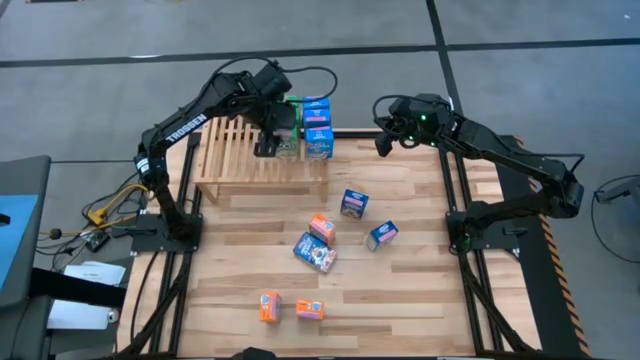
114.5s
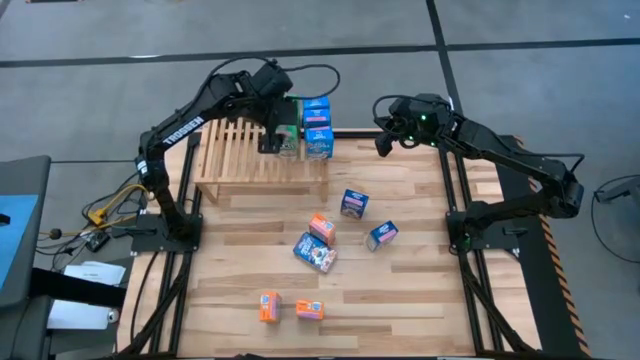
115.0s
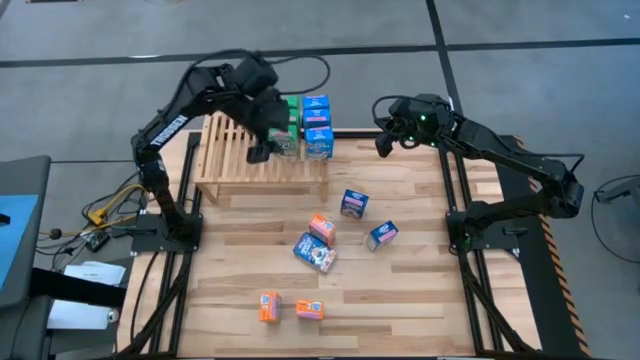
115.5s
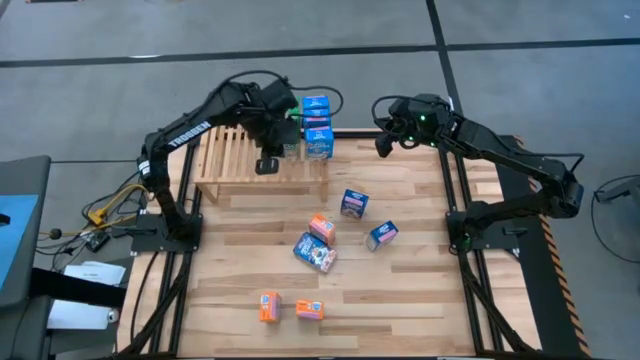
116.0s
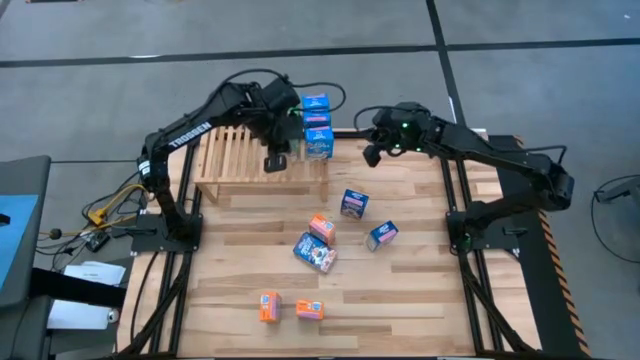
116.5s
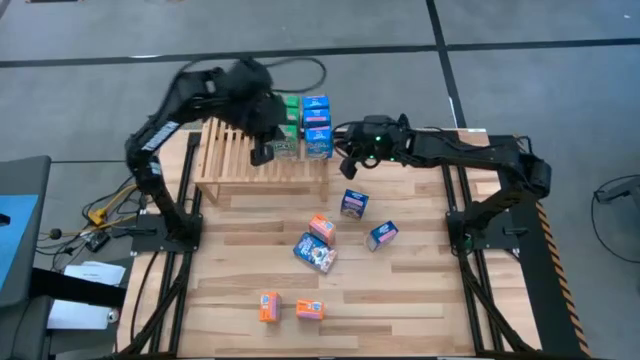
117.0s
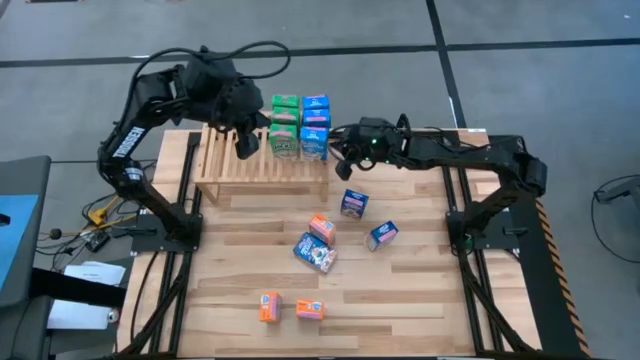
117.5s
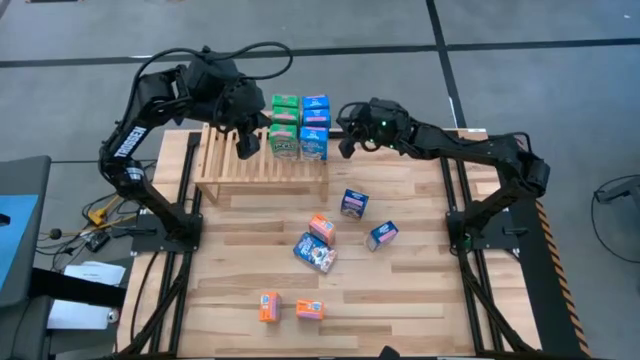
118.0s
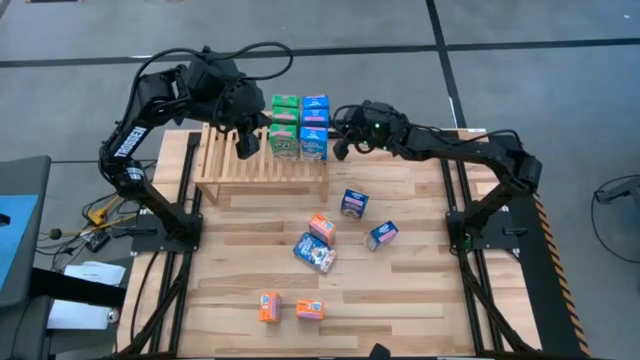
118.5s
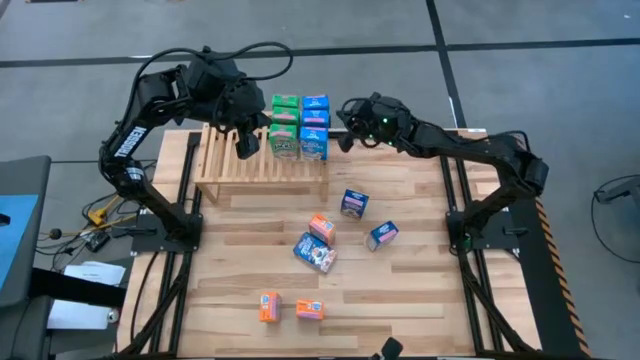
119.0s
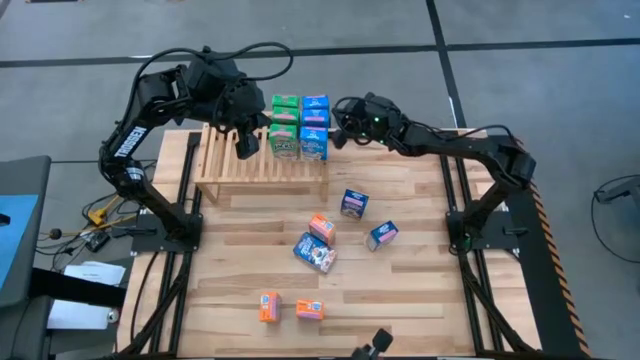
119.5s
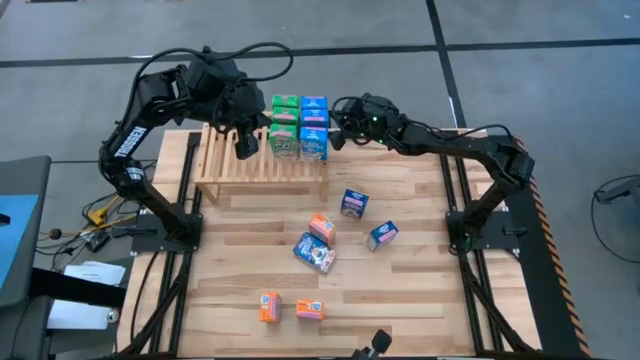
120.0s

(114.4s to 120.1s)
Task: Stack cereal on shelf
Adjust the cereal boxes on the shelf

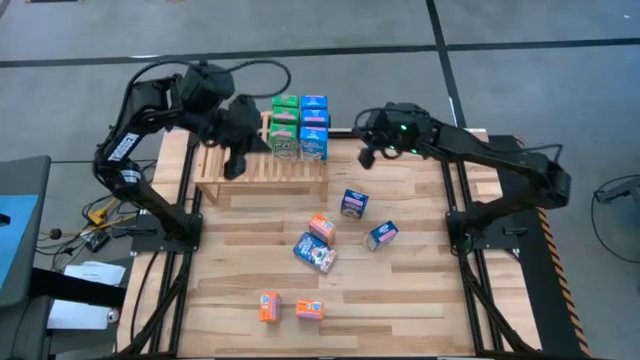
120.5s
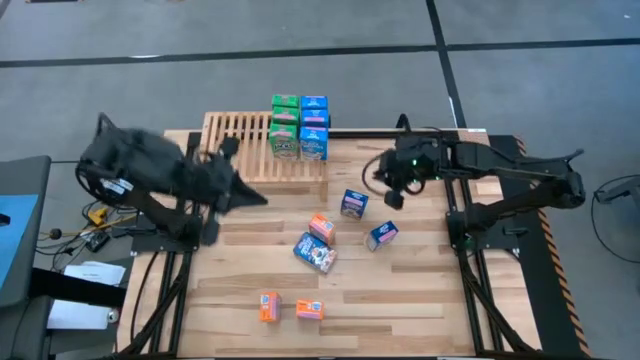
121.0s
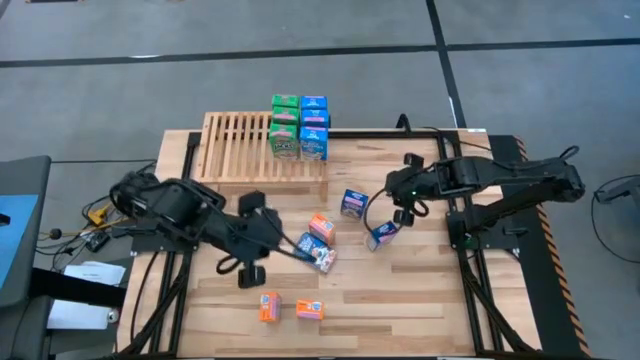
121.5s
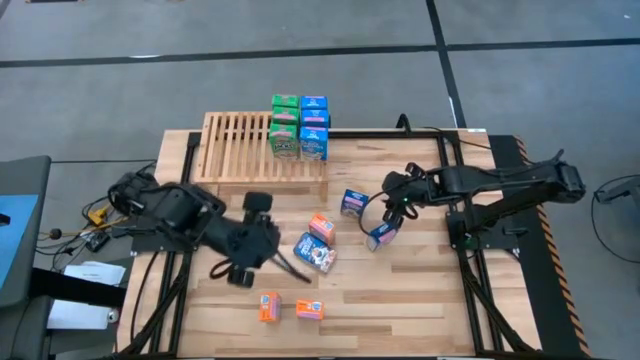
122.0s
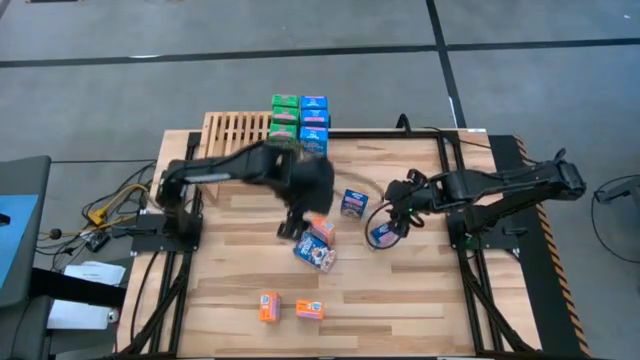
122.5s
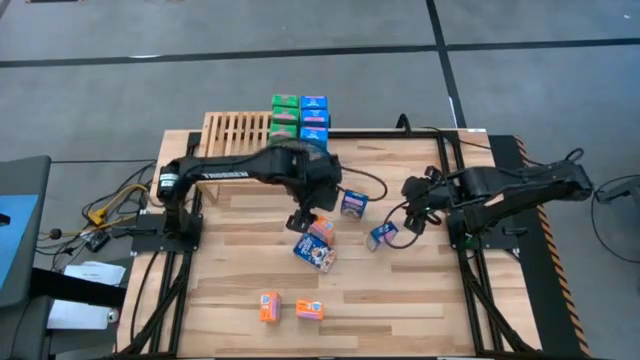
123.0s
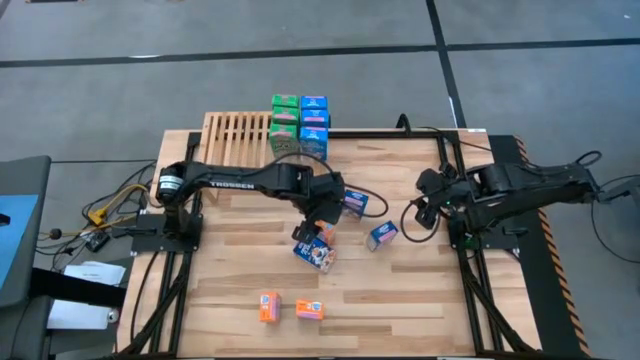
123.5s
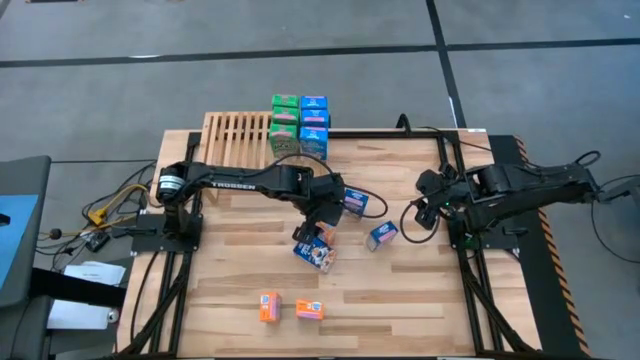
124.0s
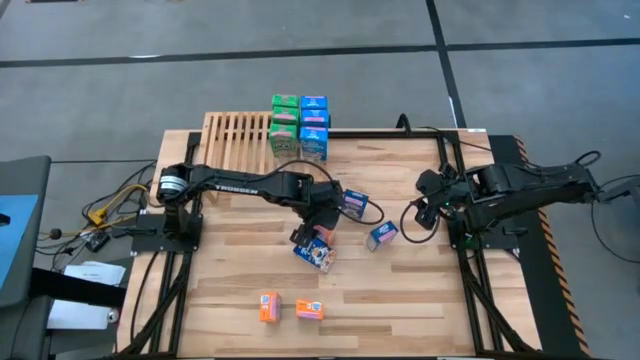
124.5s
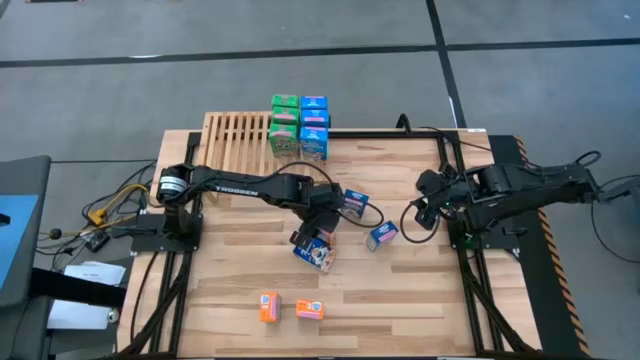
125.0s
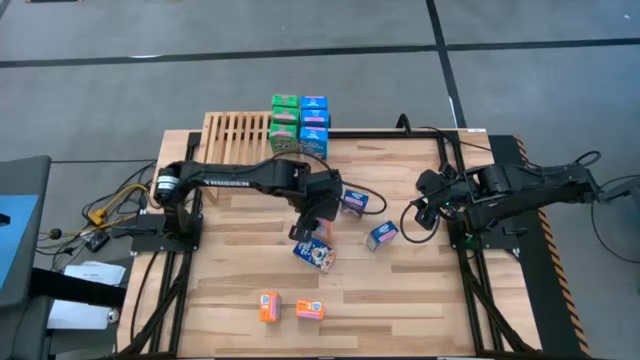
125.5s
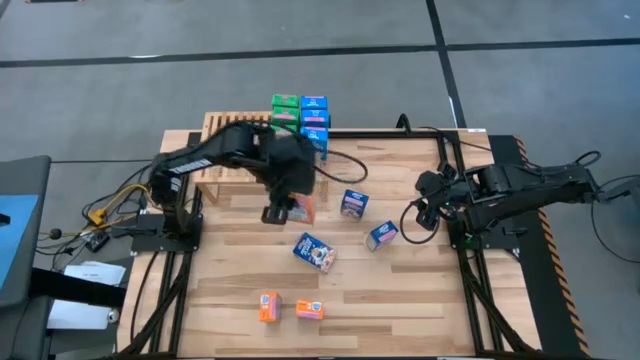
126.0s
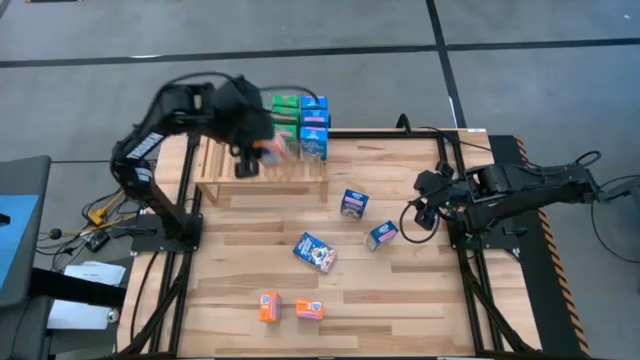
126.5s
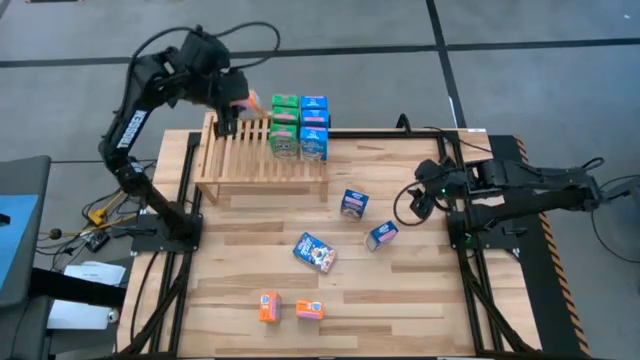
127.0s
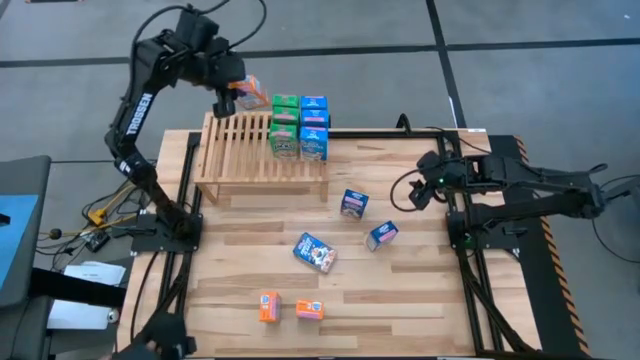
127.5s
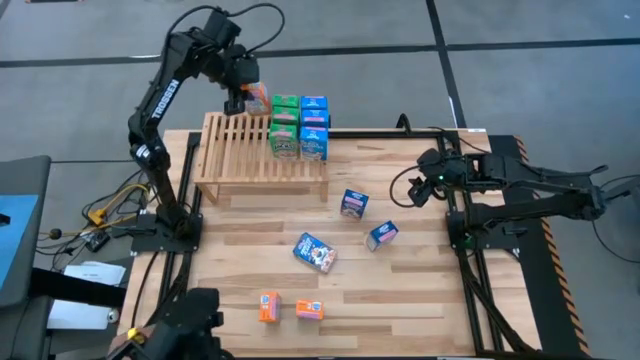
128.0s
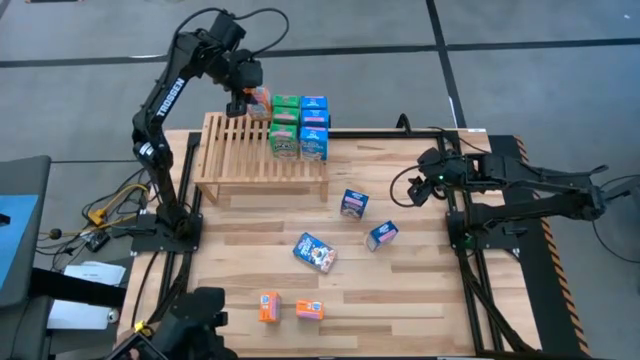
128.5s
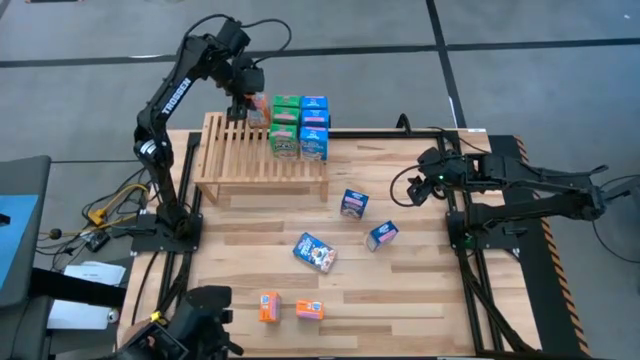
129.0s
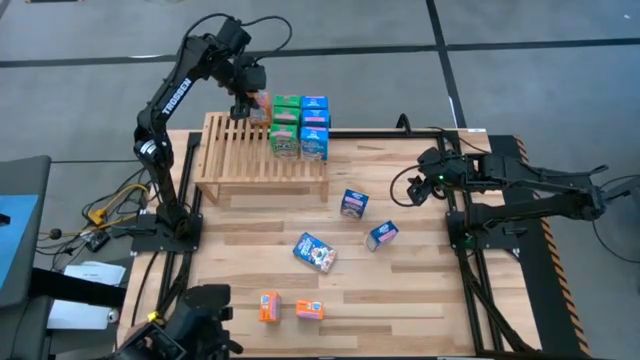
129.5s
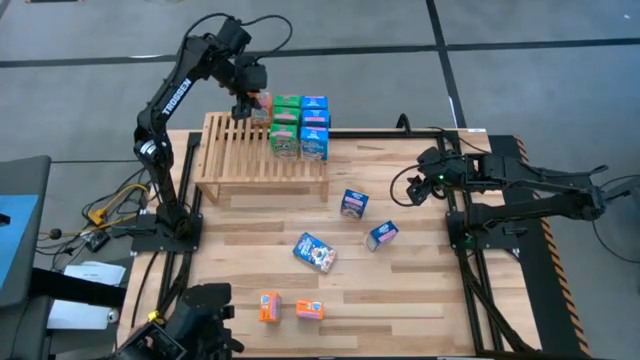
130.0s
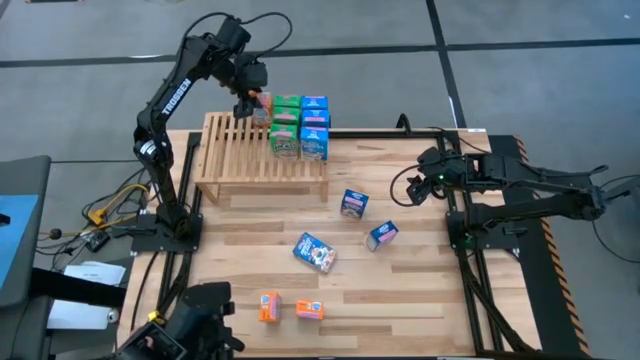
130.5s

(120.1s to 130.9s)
Put the top orange cereal box on the shelf

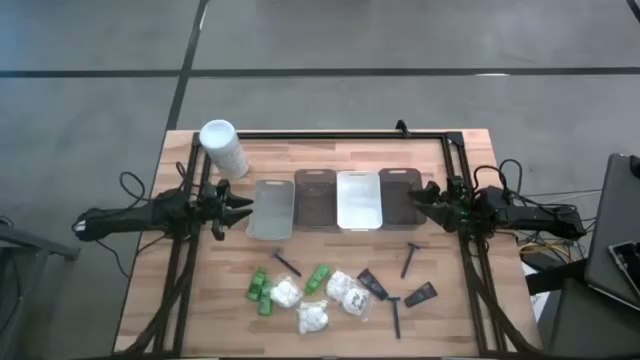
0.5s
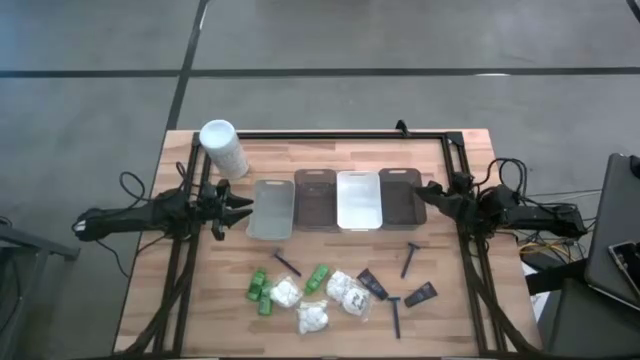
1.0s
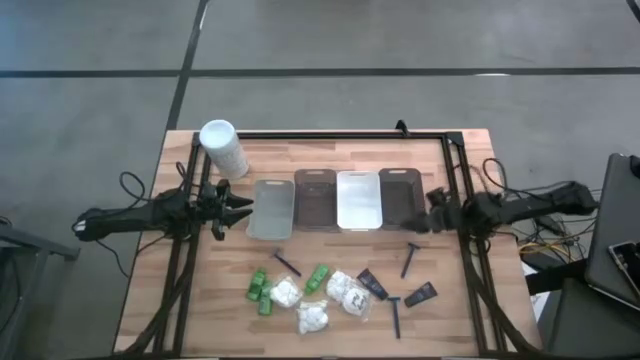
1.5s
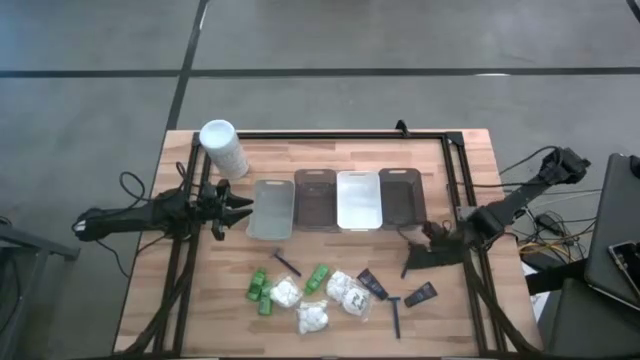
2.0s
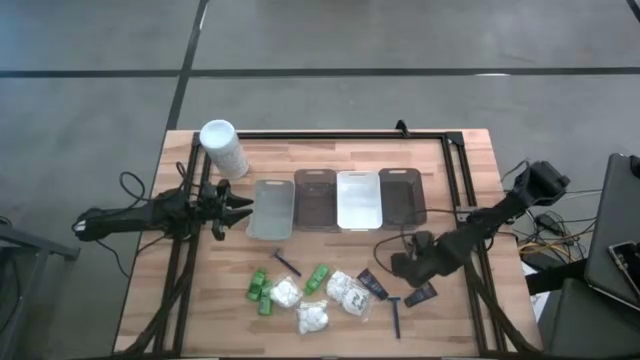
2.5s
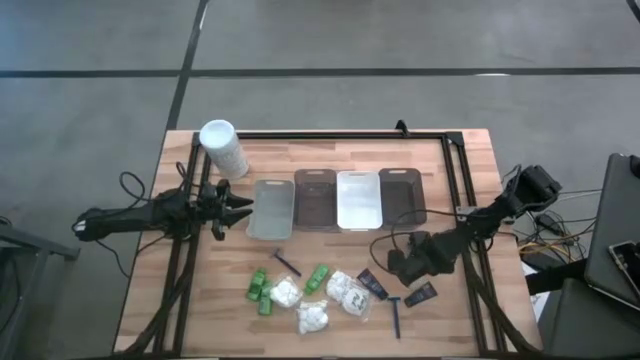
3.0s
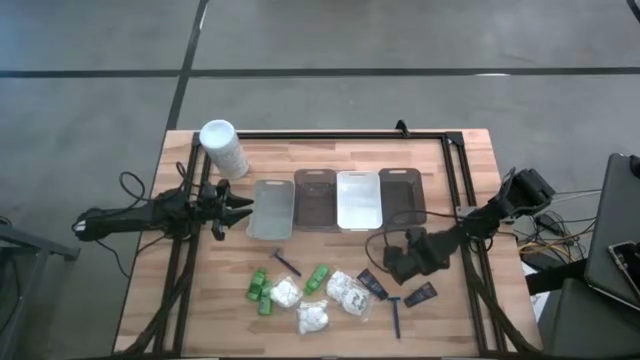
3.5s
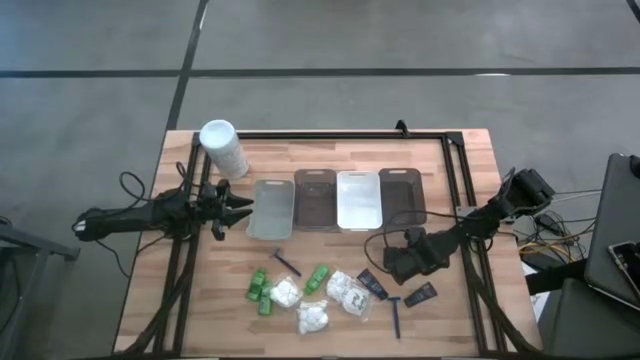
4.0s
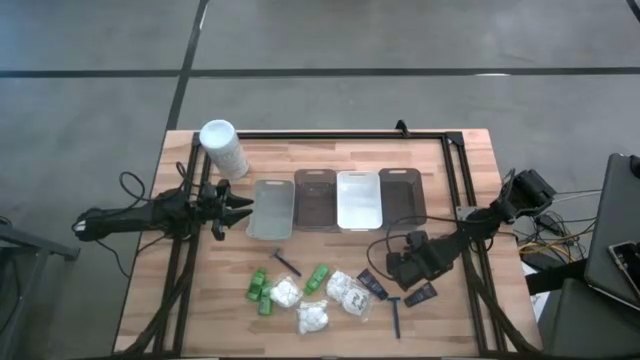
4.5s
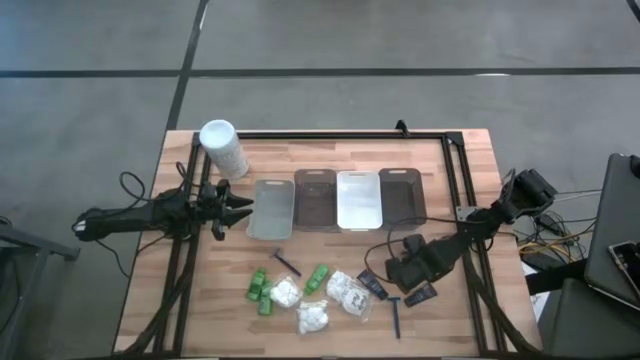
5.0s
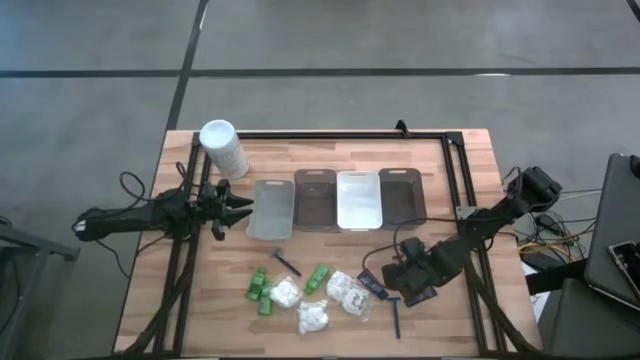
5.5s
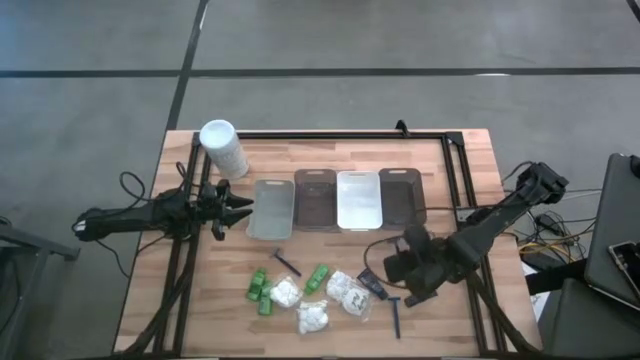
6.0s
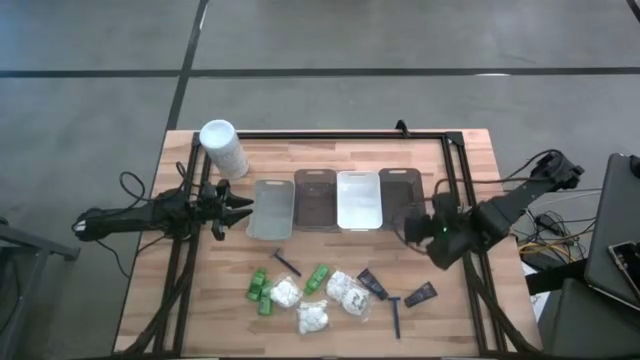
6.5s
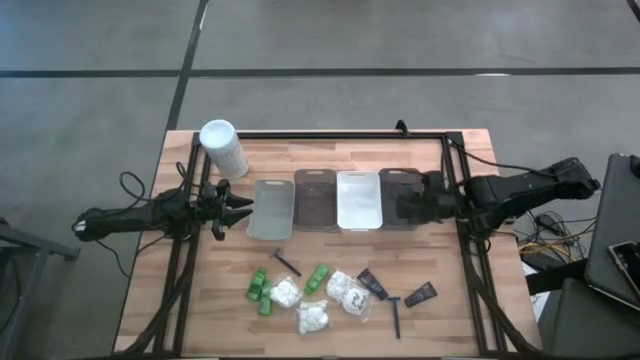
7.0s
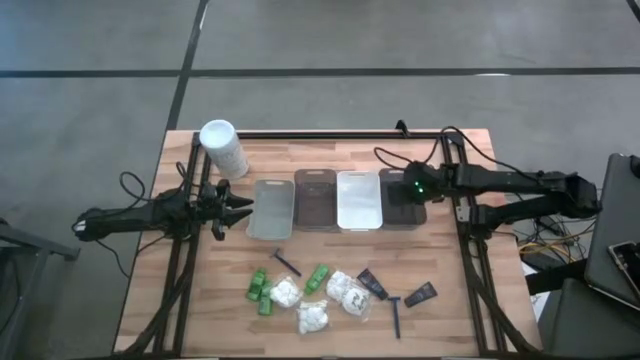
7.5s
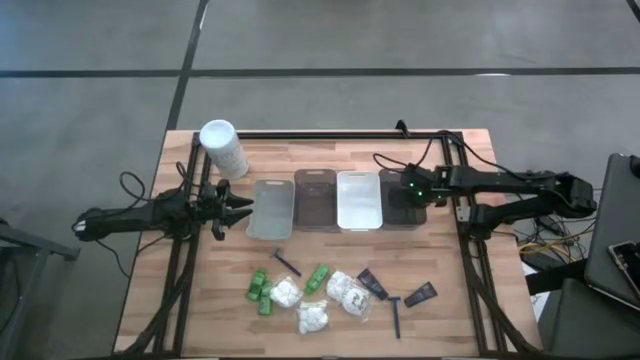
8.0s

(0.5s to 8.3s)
Task: Pick & Place Travel size toiletries
Put the top right blue razor into the right black bin
